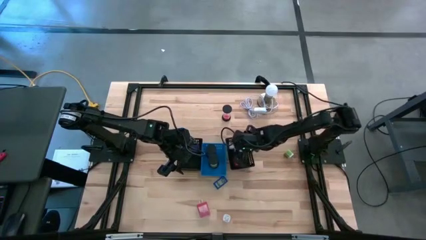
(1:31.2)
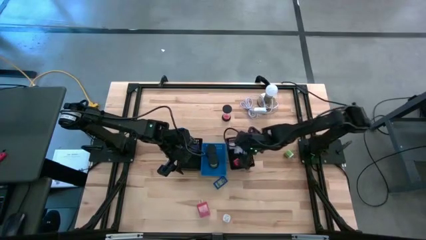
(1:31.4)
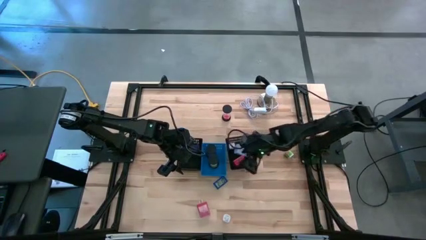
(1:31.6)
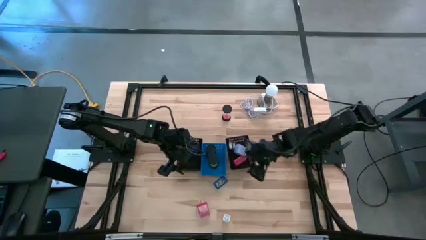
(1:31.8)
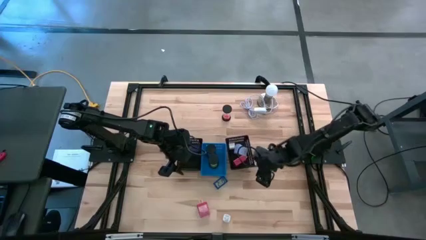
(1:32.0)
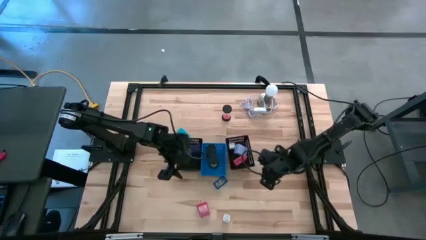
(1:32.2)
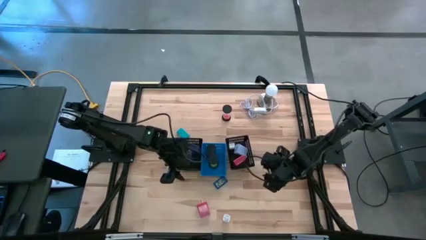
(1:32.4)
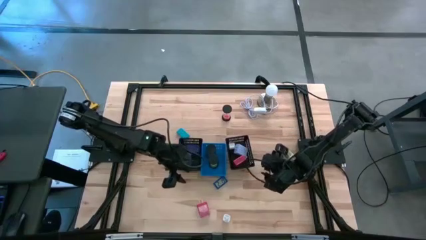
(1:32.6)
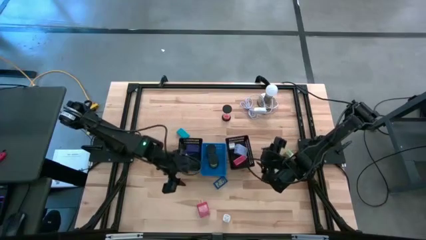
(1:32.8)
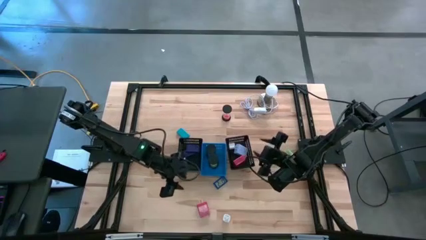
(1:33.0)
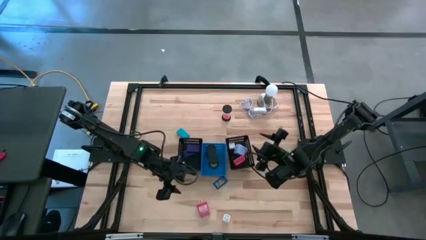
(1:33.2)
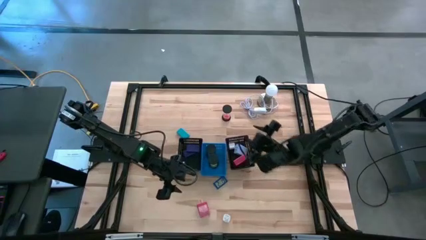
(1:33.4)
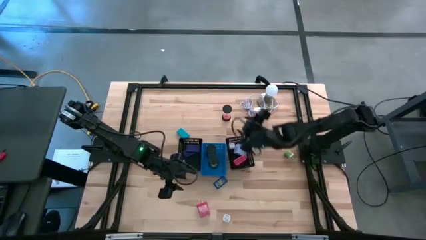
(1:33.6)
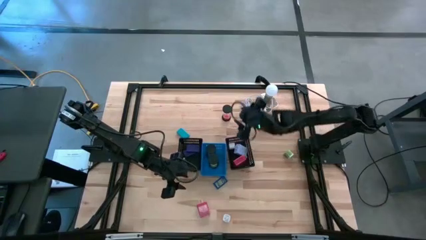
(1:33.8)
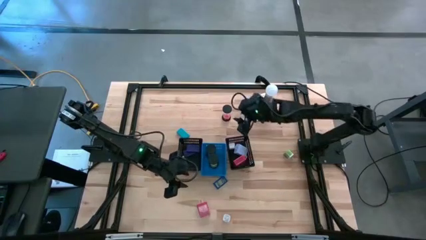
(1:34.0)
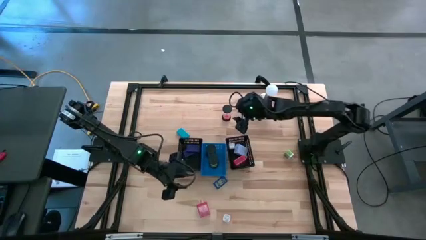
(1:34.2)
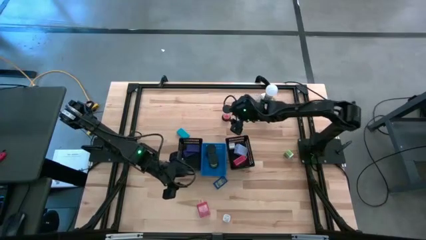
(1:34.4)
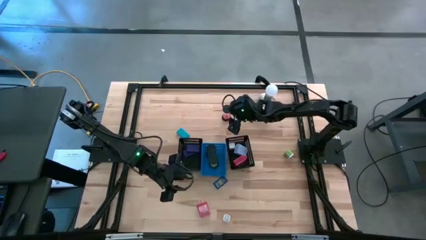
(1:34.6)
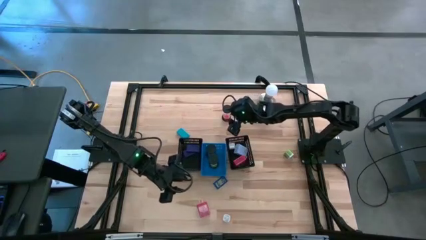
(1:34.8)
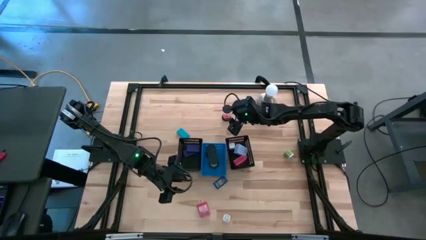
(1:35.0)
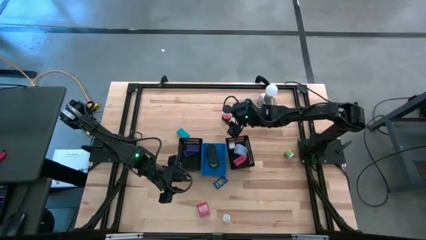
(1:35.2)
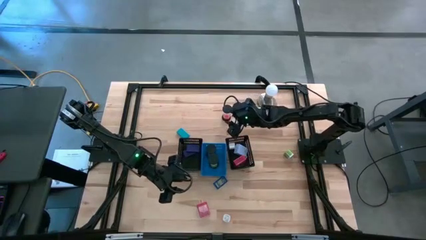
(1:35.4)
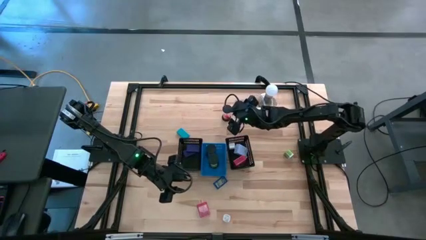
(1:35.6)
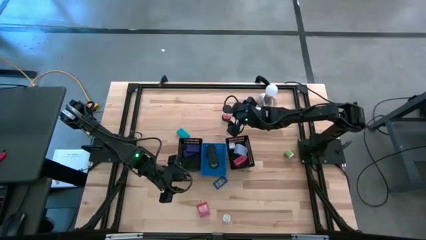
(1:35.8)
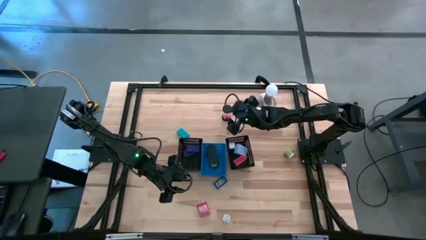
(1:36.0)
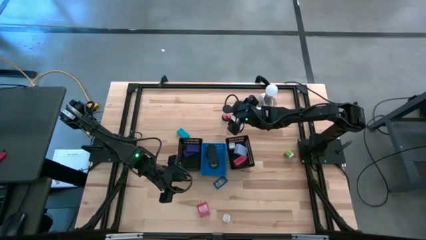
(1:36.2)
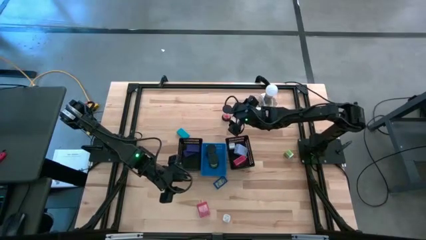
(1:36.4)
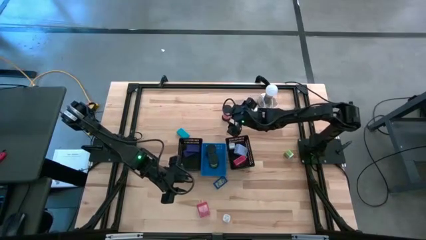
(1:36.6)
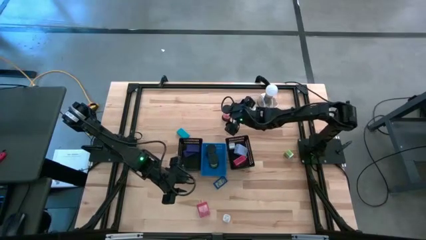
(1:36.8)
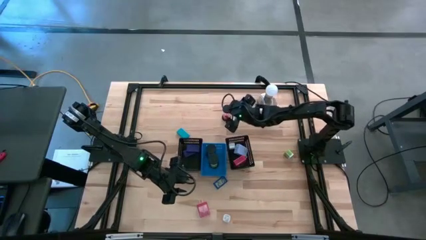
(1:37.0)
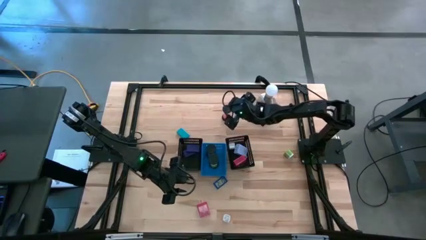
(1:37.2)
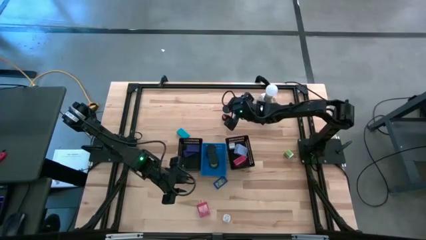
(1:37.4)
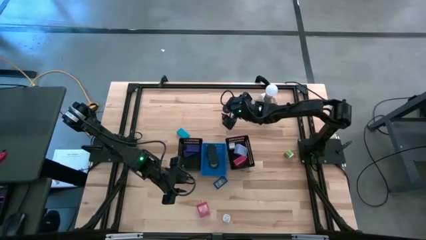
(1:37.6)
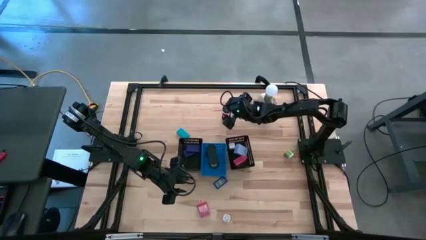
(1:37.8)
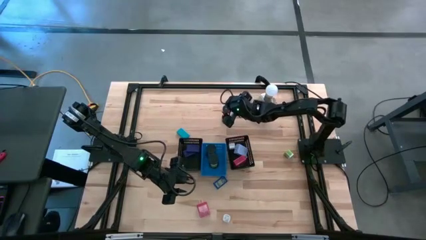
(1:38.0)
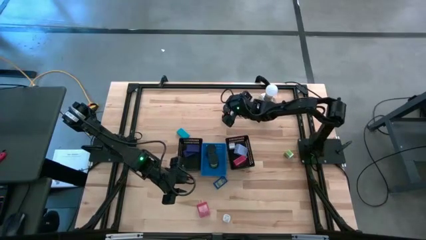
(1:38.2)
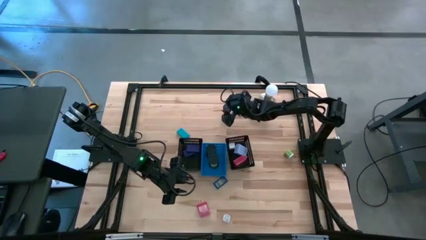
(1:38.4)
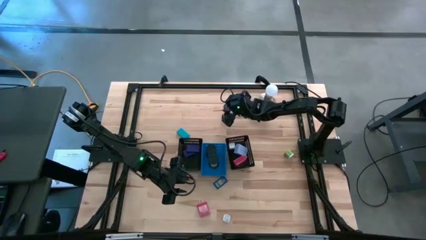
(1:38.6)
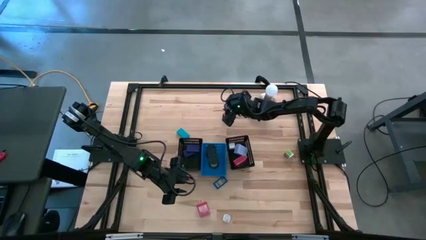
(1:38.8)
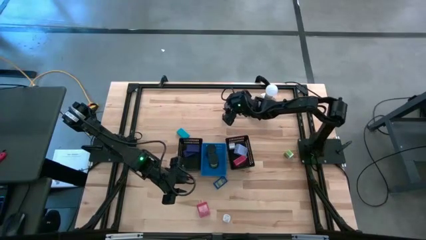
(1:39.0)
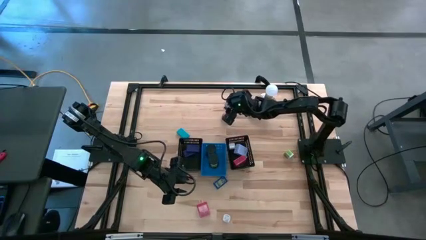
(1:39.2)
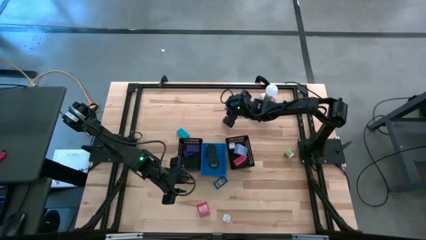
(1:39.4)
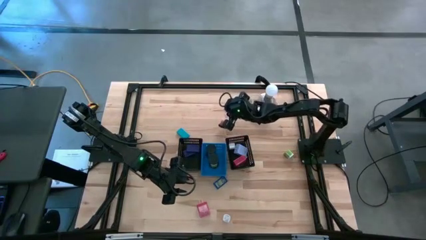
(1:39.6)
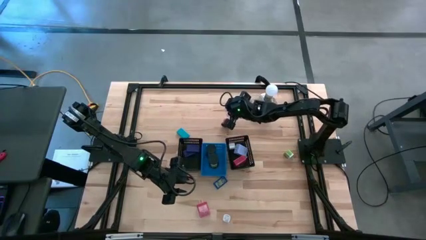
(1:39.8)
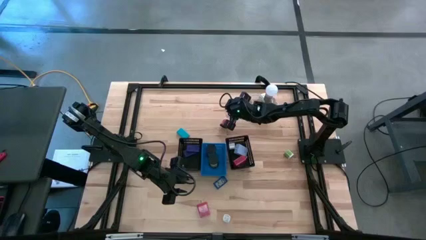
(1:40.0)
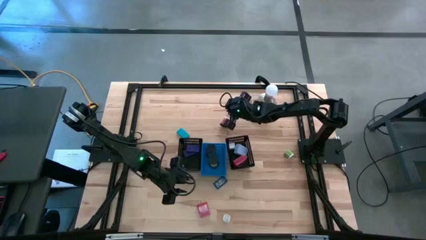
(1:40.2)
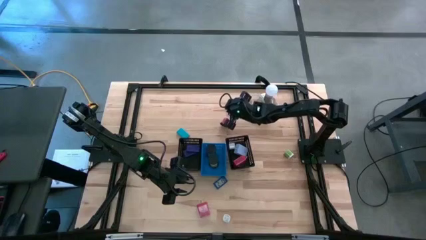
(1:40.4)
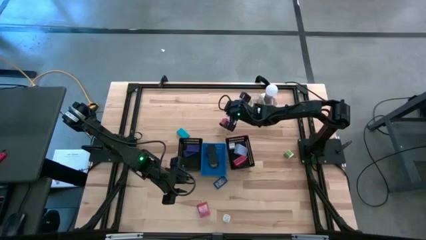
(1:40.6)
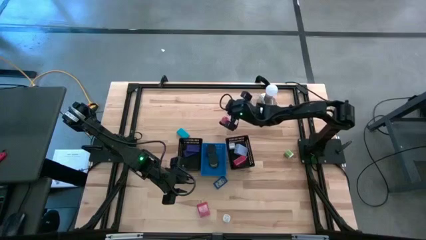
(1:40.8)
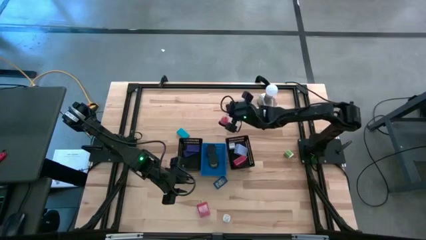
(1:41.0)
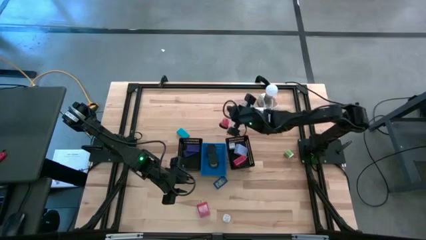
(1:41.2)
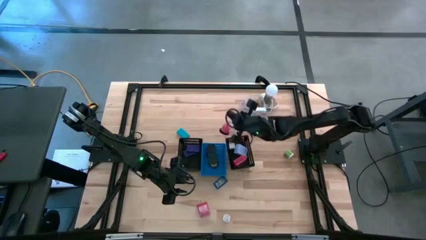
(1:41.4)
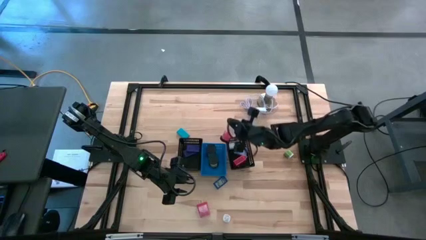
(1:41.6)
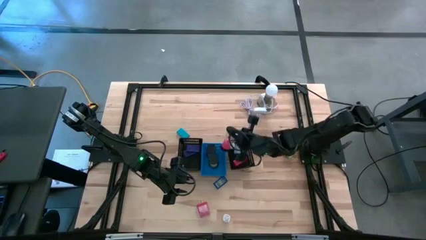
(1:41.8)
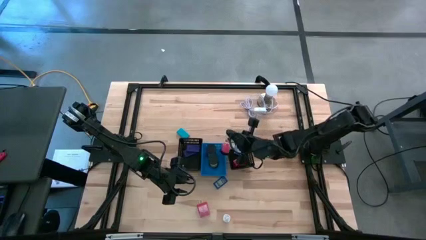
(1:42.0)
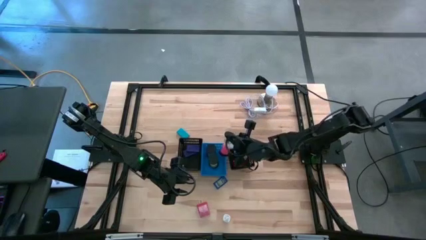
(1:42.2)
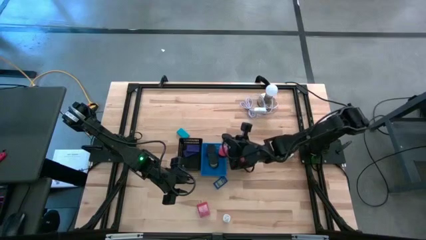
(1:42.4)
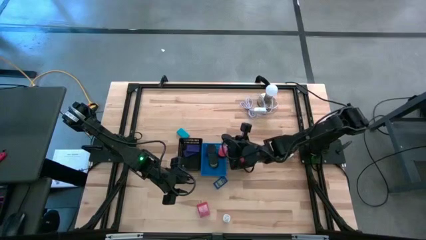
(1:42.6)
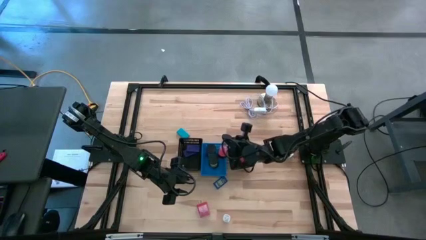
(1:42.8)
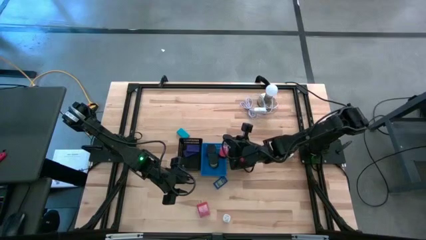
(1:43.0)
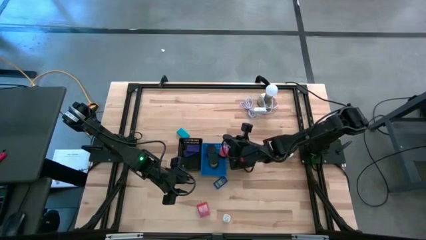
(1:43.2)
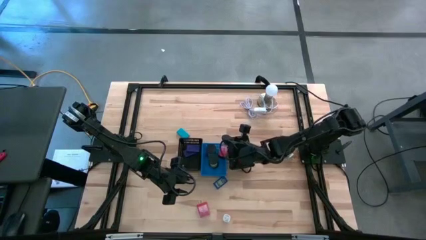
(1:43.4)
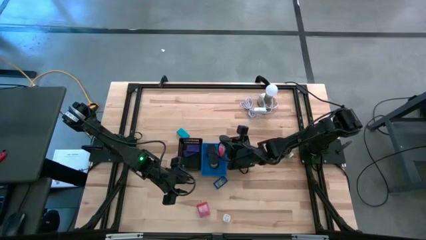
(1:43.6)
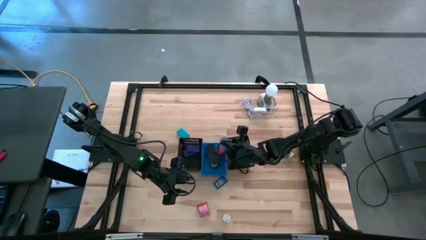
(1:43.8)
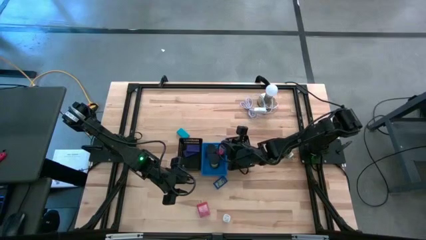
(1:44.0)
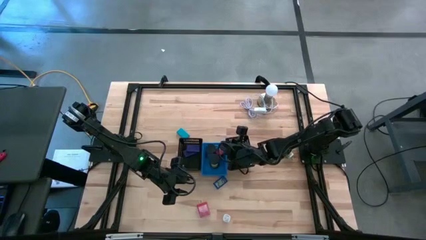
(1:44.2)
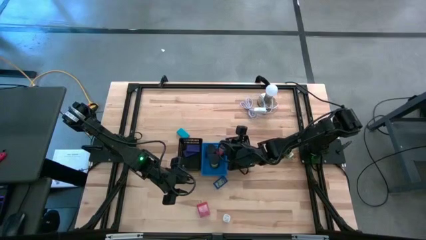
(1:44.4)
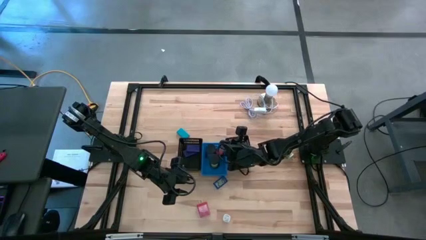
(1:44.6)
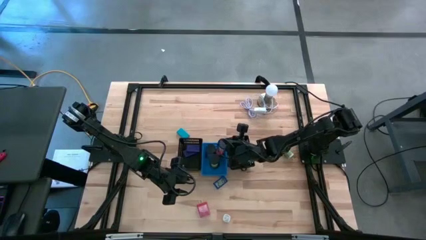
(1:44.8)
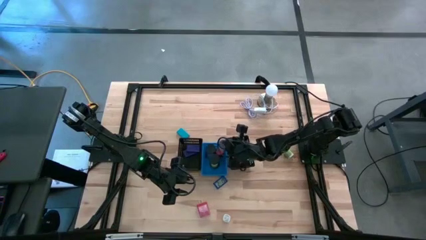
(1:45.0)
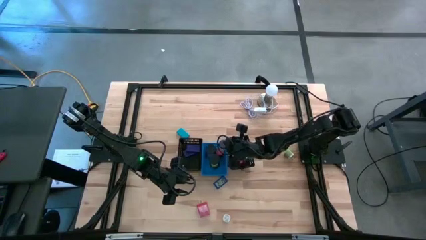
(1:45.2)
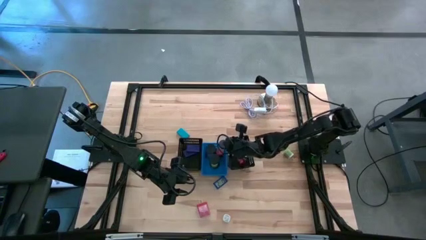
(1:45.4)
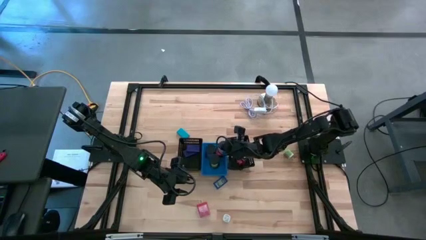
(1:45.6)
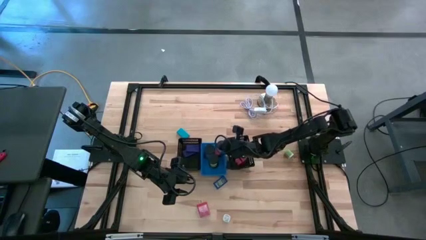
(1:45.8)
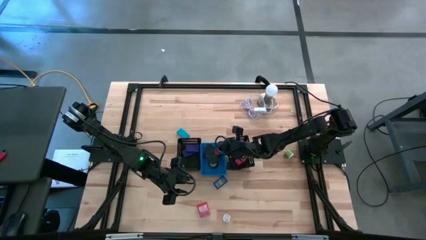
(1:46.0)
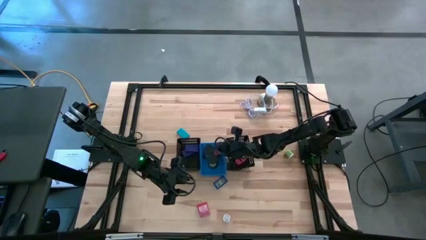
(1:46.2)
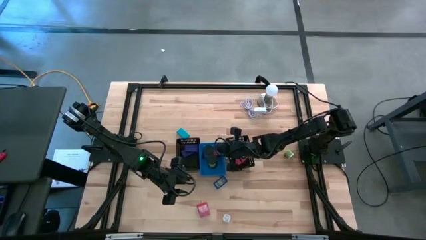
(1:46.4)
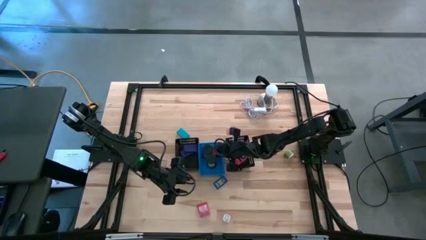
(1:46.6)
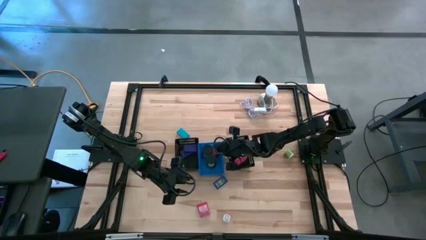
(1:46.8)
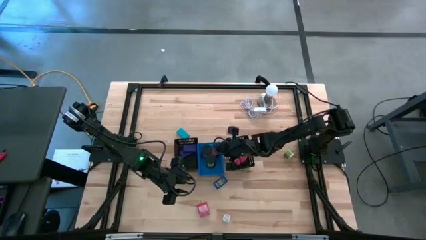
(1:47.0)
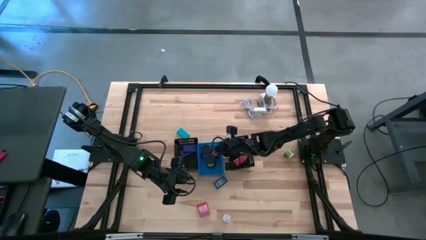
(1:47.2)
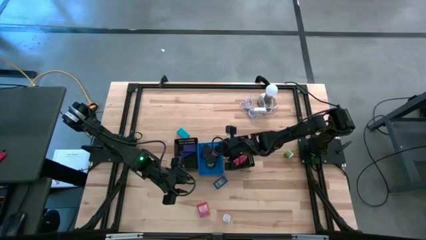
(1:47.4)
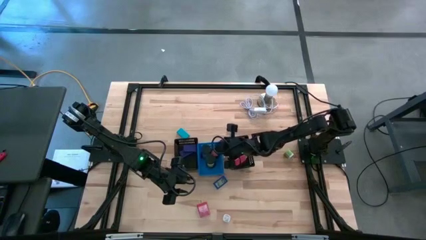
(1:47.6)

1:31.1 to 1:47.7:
Task: Pick & Place Office items
Put the red hourglass into the blue bin
